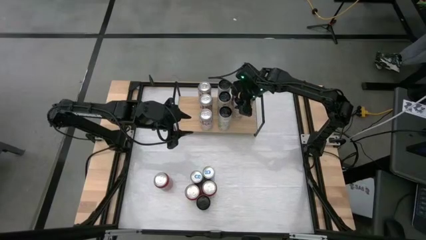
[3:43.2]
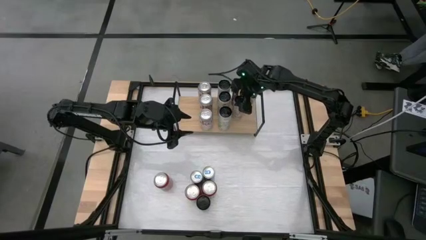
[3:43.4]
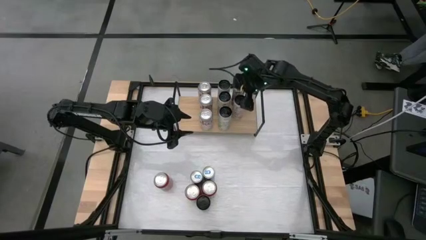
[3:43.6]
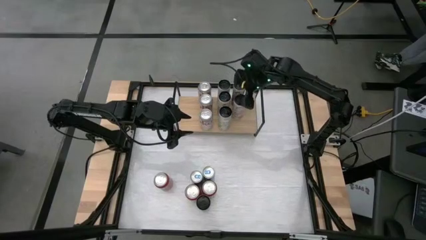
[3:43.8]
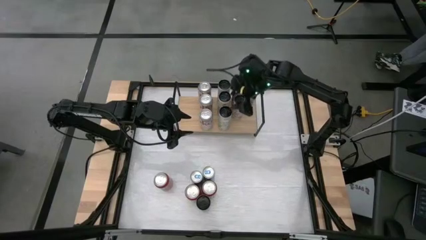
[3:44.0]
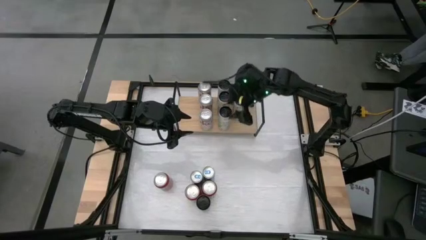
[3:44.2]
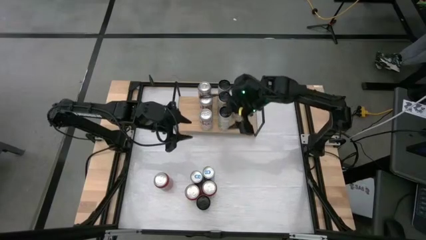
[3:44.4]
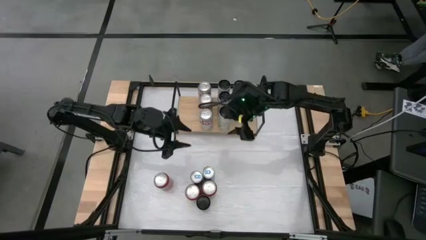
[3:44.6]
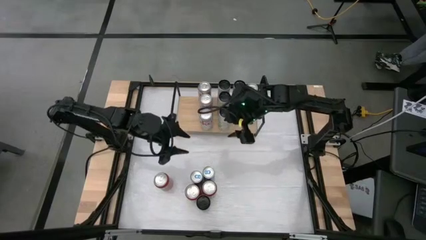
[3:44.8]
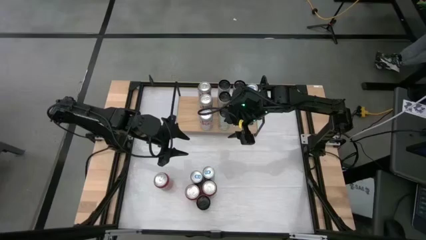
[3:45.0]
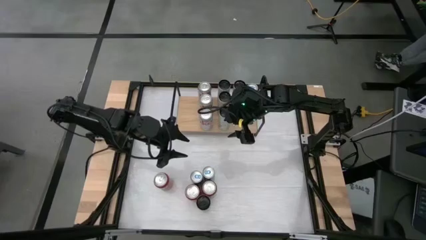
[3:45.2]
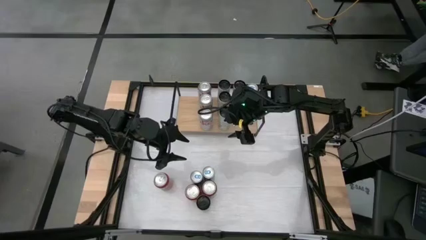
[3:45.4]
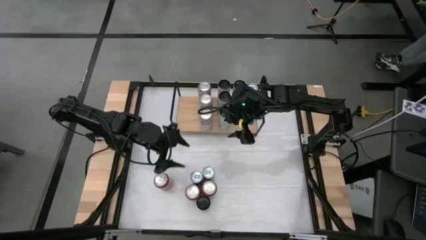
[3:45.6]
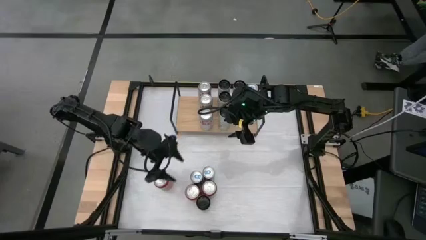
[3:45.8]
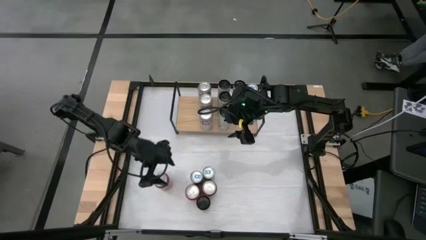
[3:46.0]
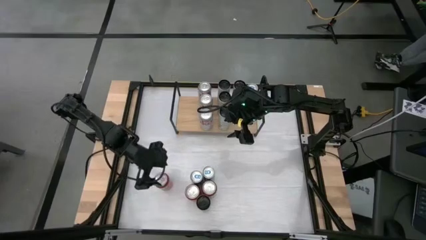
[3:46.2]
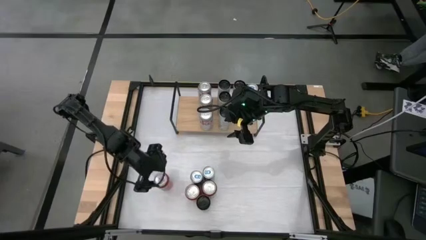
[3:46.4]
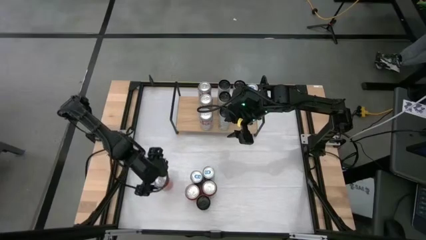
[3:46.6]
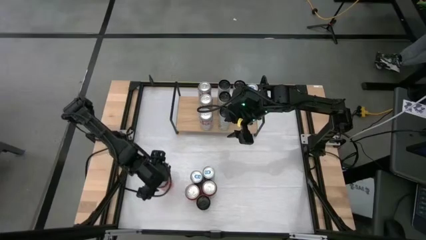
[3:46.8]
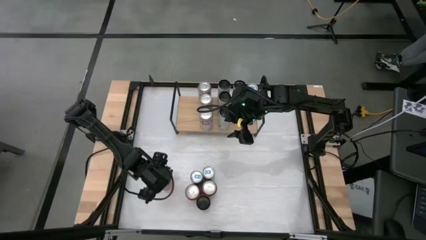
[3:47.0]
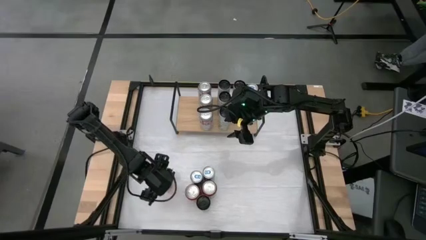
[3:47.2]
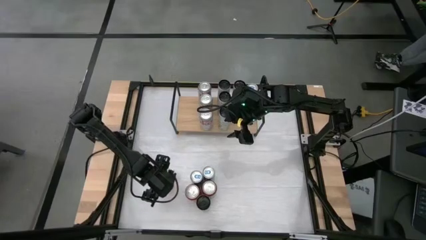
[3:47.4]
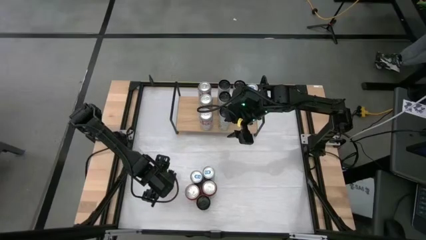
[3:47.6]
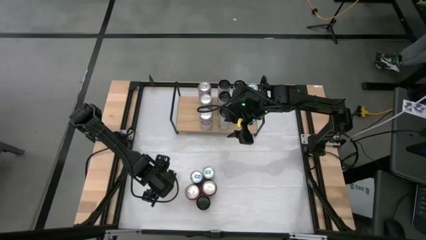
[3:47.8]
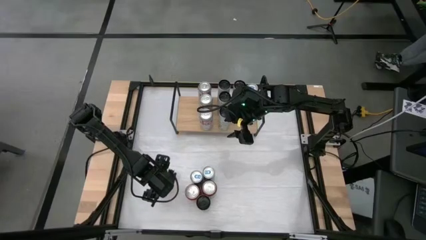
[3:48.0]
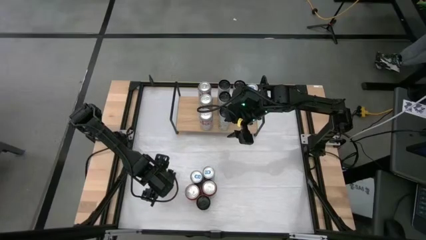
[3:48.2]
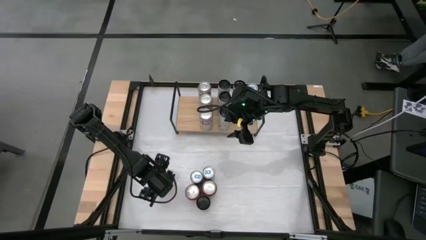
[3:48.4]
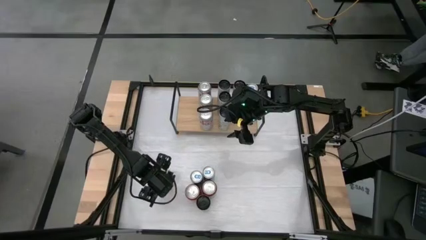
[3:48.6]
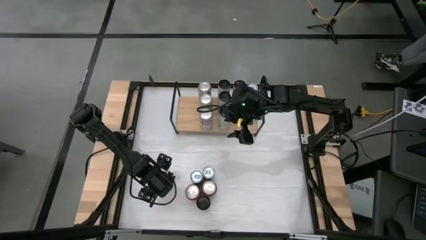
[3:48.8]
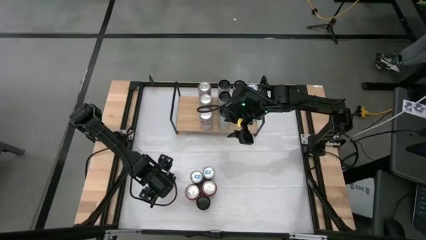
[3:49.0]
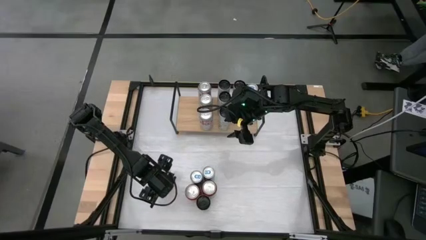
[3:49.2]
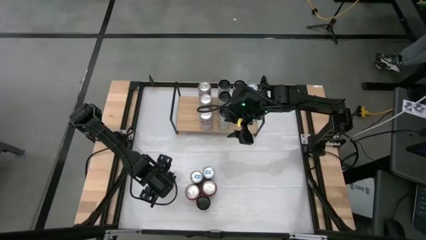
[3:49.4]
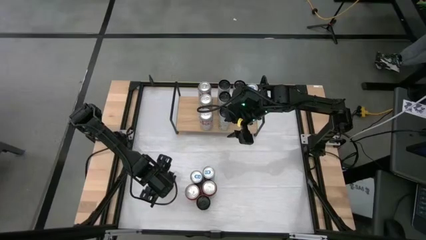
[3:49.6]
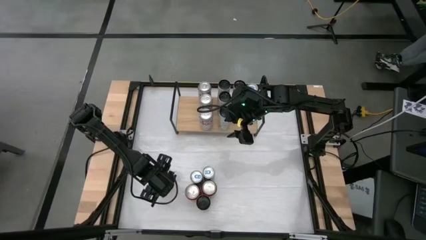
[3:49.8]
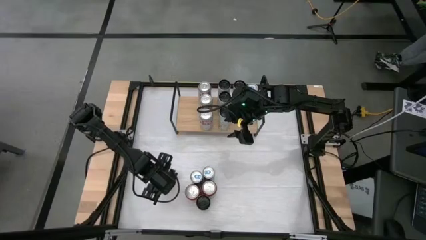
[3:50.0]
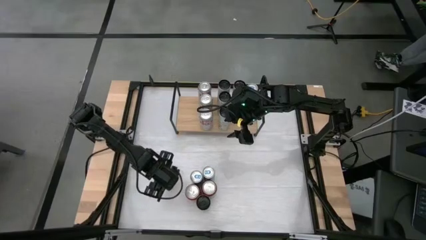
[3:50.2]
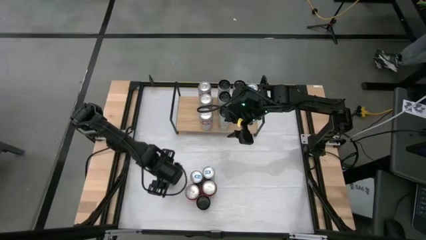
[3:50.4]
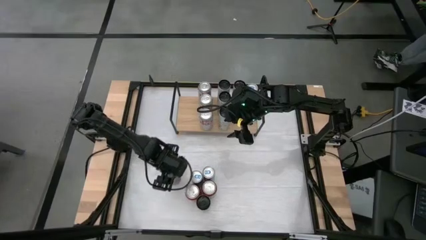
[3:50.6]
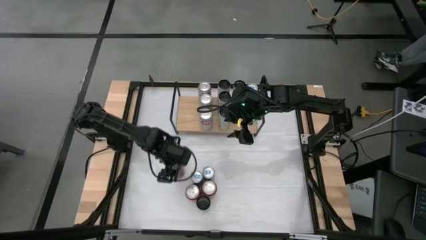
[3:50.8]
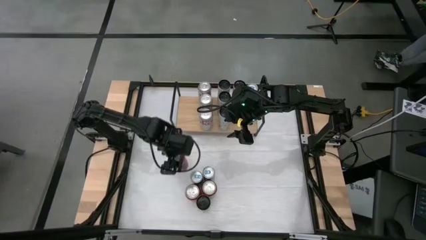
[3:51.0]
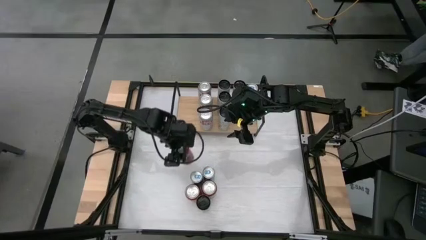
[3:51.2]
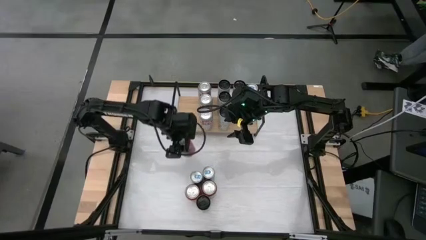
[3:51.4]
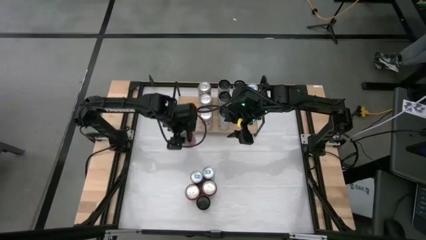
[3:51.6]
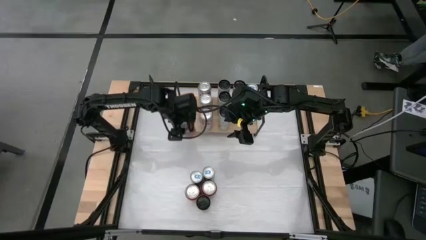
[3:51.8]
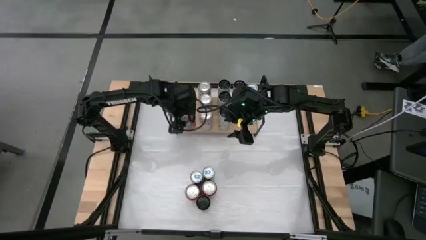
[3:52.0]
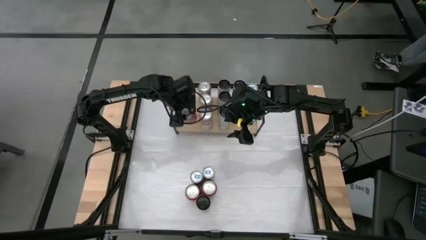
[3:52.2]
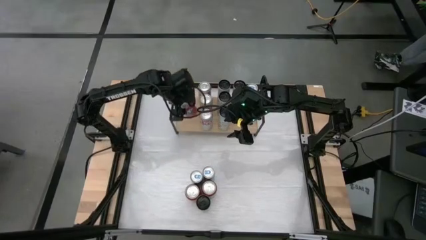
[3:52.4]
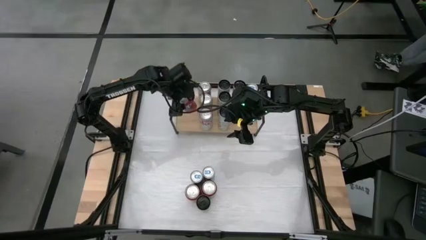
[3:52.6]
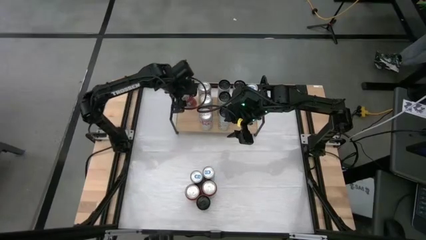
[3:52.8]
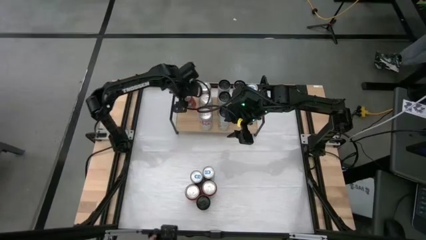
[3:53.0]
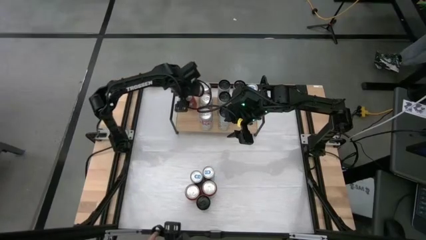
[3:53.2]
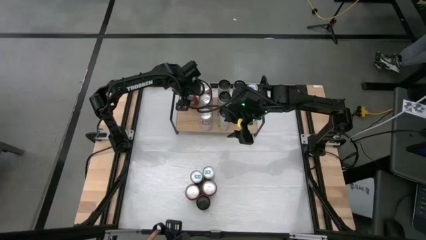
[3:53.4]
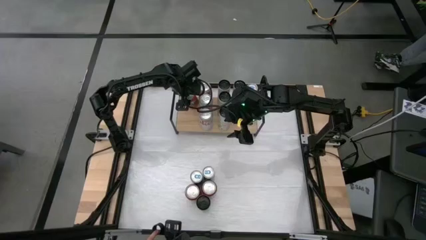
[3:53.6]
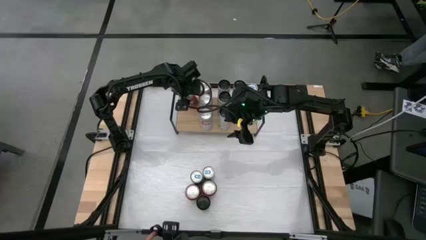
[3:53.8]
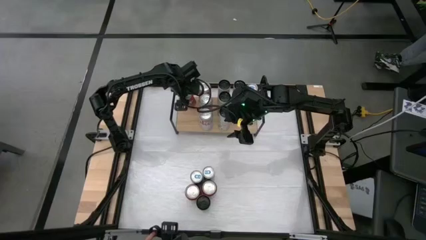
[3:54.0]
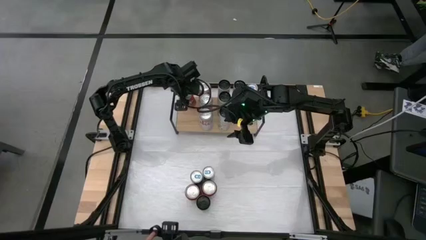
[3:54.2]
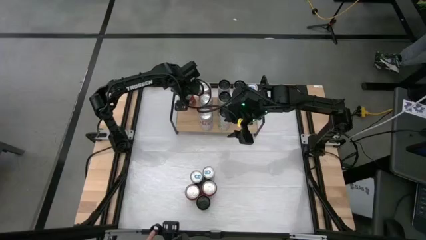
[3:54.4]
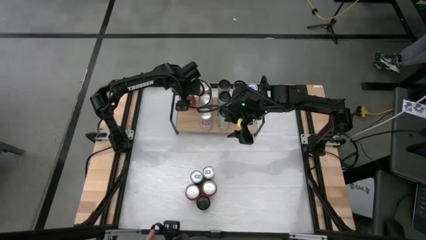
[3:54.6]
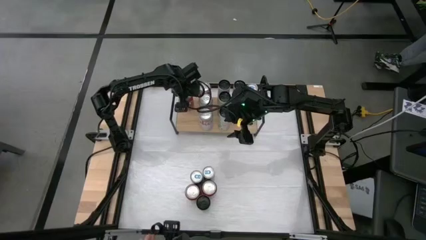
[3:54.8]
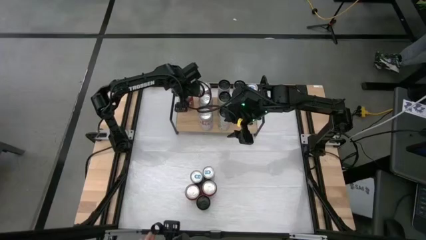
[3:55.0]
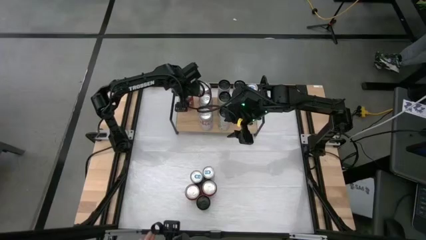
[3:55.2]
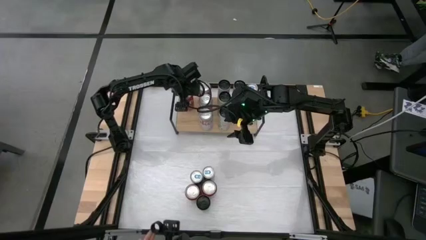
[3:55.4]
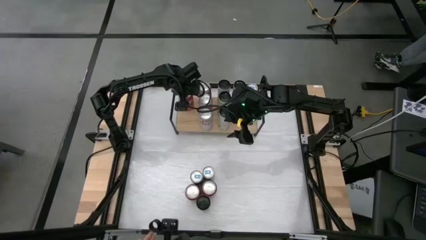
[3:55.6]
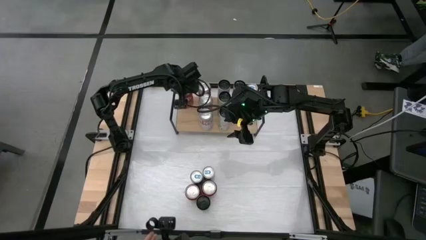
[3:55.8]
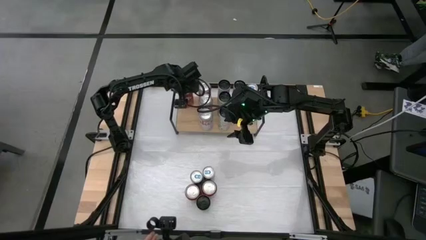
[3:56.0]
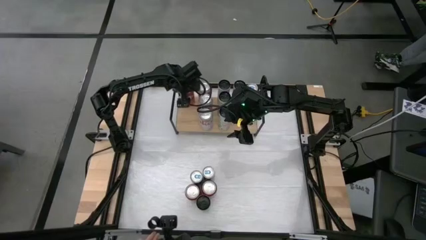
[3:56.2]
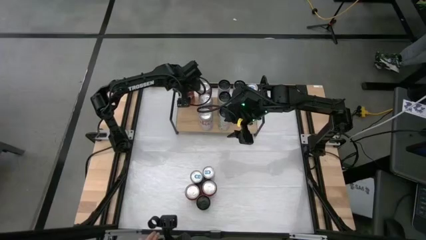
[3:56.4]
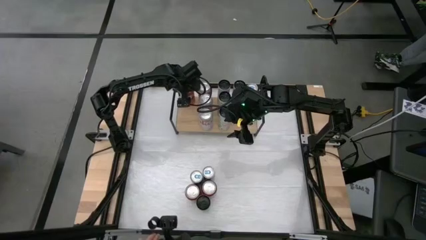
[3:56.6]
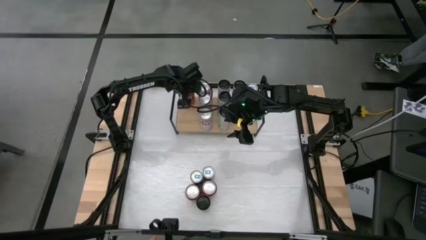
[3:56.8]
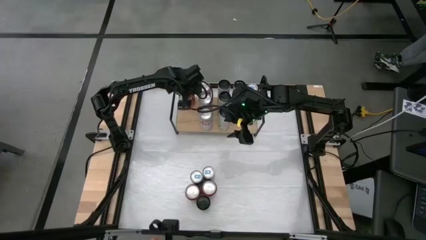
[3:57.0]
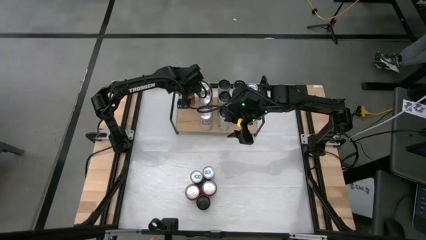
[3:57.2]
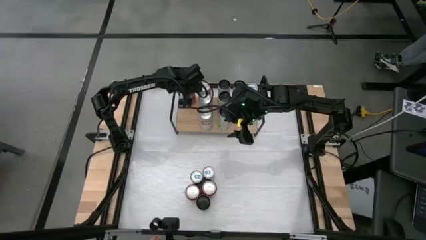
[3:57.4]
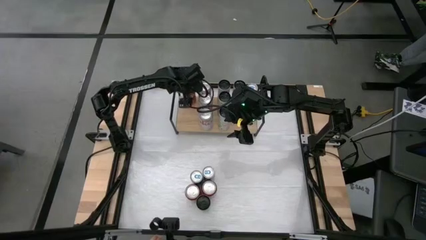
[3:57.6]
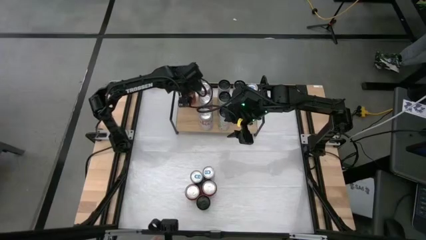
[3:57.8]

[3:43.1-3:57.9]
Task: Place canned beverage on shelf
Put the red soda can onto the shelf

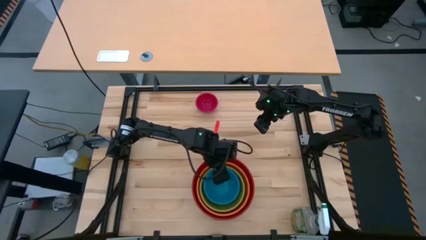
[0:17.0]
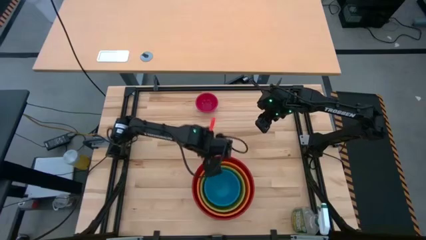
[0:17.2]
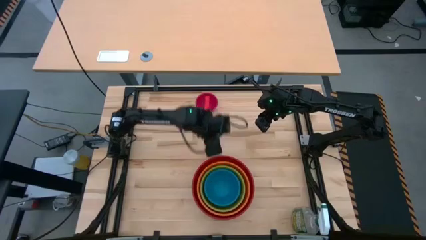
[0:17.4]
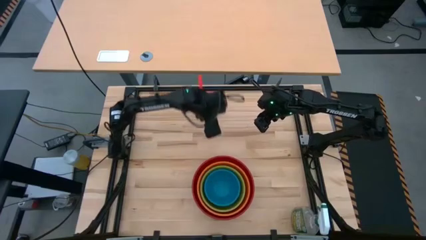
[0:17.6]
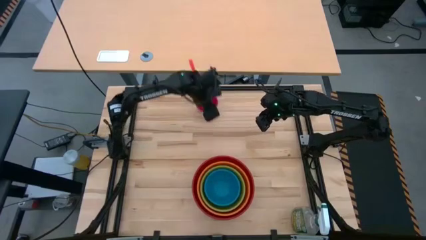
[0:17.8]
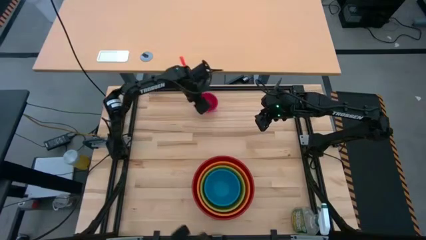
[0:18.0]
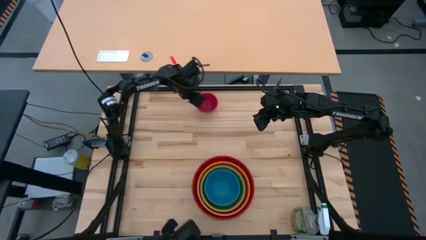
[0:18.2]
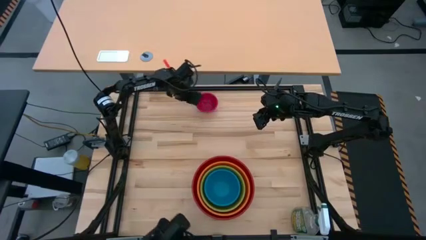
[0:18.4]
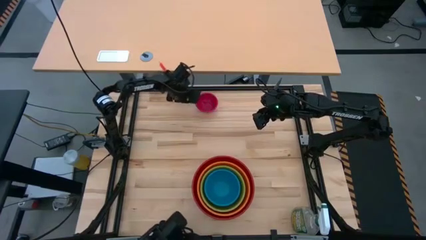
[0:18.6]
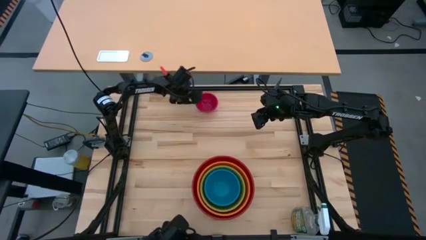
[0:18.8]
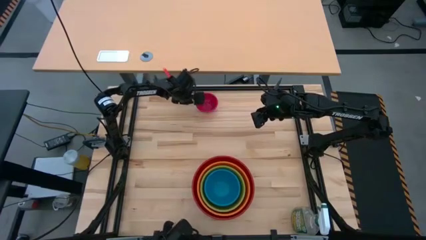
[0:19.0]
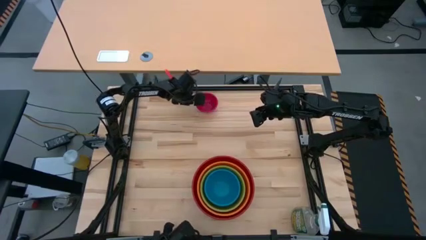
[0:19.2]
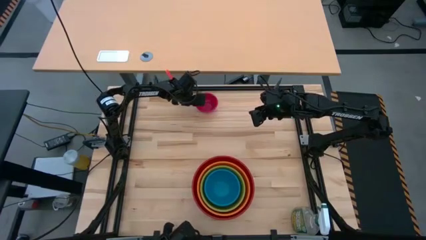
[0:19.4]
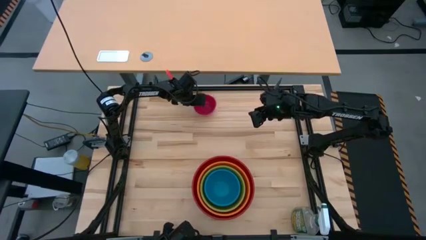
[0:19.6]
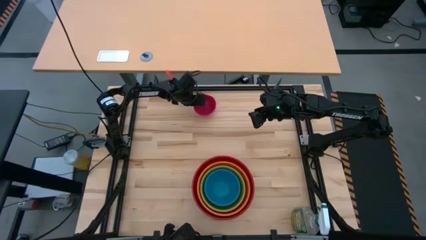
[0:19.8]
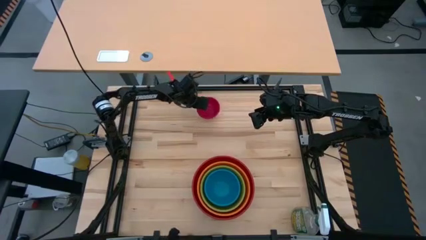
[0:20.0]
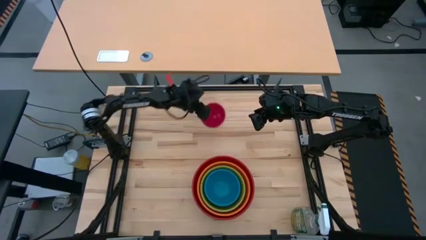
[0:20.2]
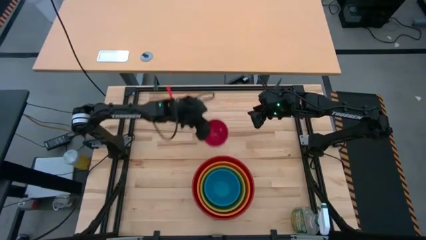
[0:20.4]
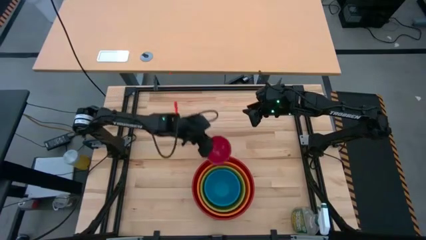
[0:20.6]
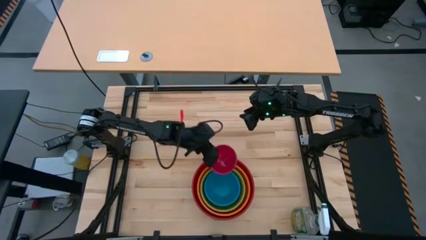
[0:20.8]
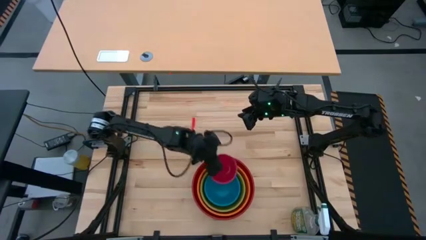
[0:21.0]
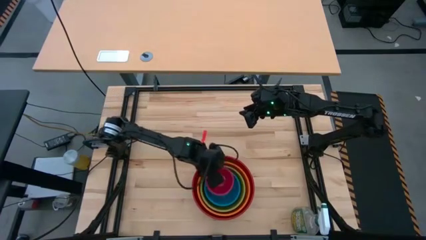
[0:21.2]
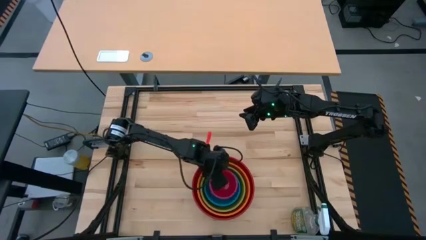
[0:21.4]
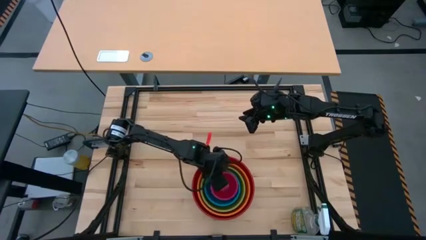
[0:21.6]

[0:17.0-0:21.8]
Task: Nest bowls inside each other by size order
Stack the purple bowl on top of the blue bowl
